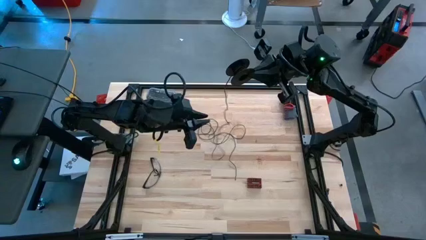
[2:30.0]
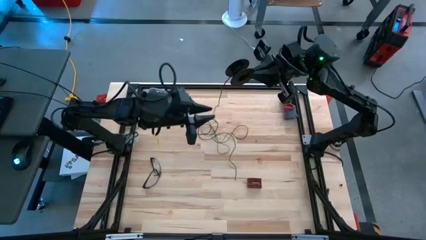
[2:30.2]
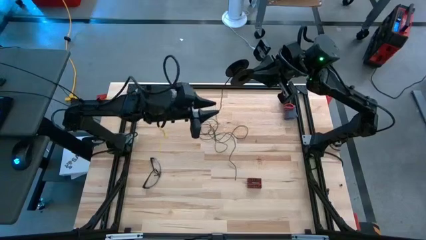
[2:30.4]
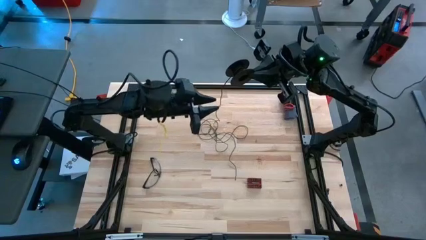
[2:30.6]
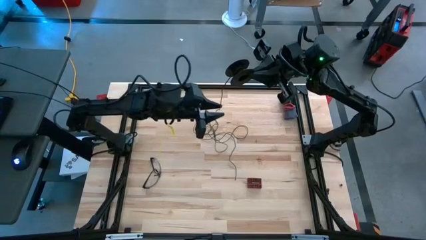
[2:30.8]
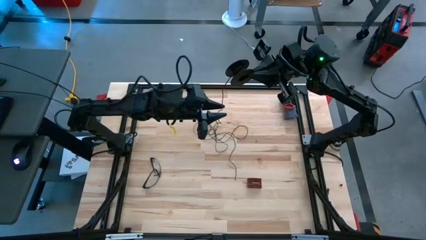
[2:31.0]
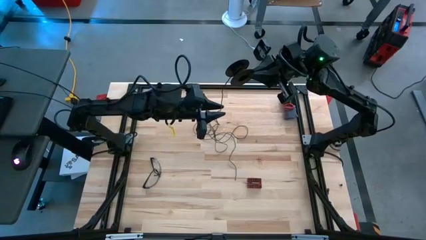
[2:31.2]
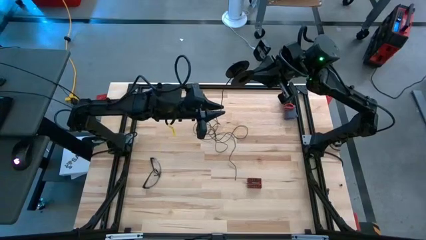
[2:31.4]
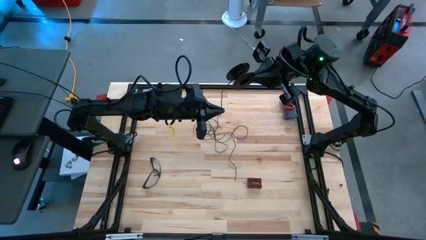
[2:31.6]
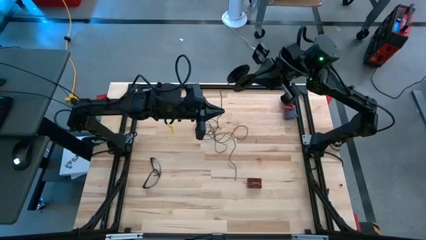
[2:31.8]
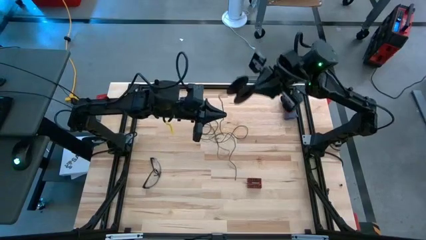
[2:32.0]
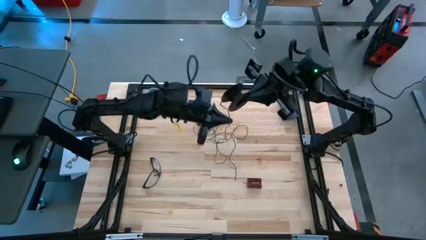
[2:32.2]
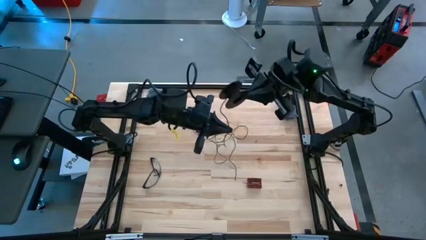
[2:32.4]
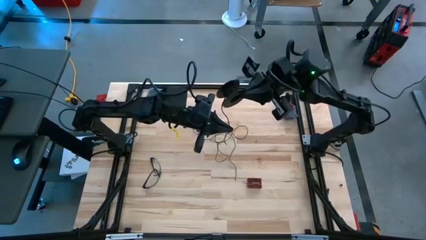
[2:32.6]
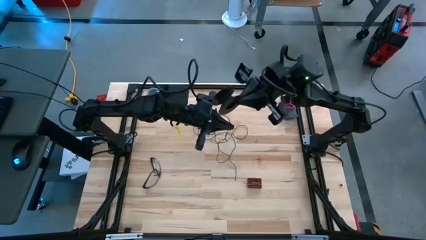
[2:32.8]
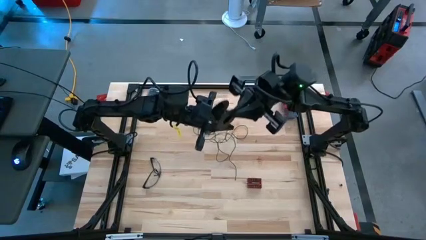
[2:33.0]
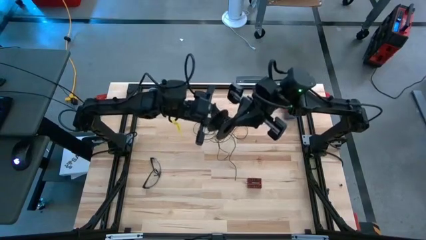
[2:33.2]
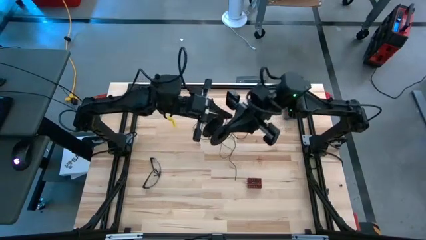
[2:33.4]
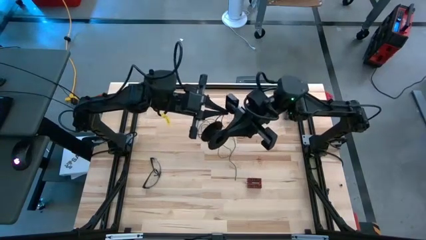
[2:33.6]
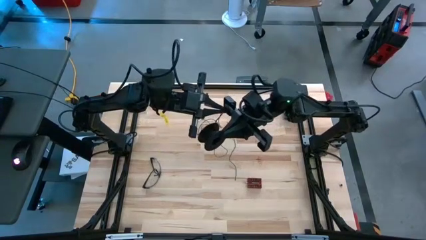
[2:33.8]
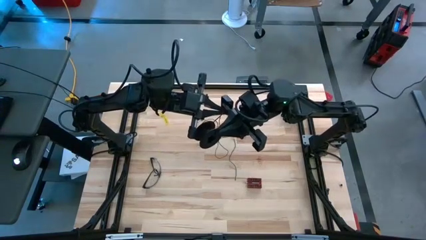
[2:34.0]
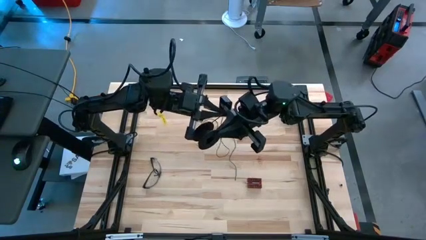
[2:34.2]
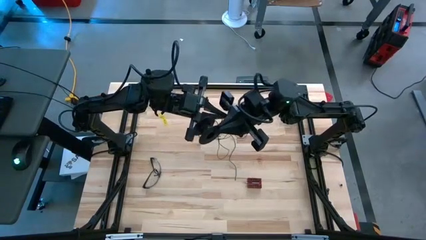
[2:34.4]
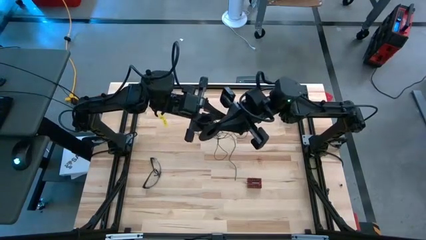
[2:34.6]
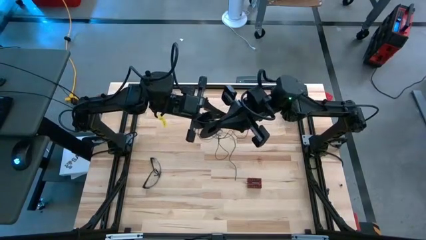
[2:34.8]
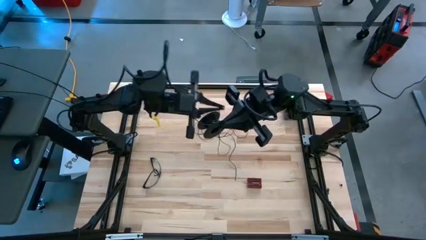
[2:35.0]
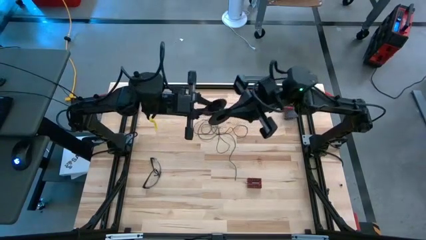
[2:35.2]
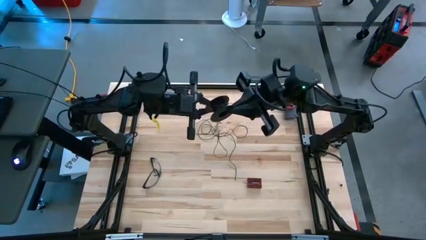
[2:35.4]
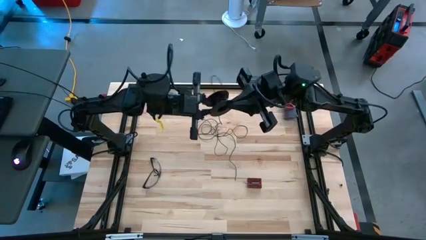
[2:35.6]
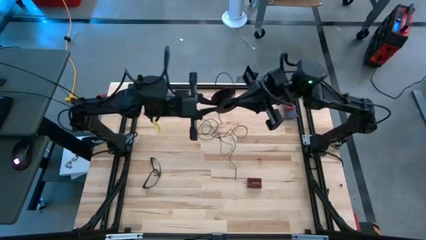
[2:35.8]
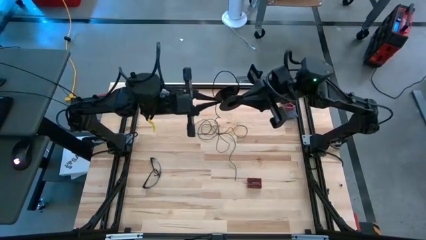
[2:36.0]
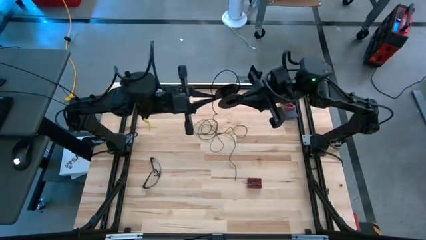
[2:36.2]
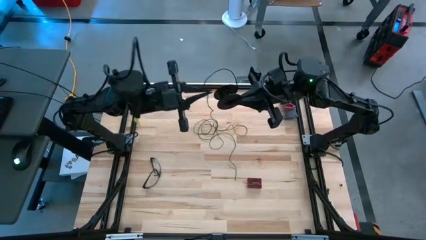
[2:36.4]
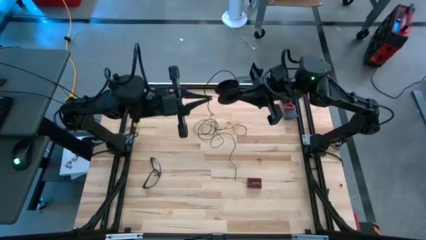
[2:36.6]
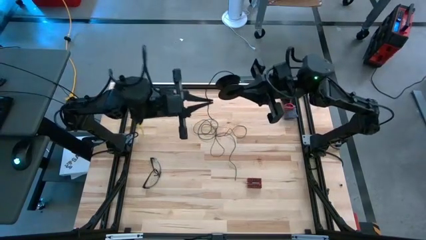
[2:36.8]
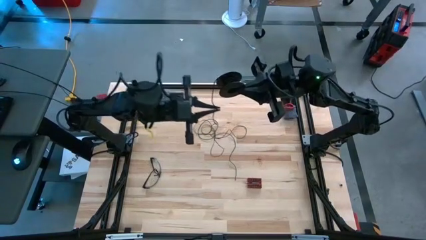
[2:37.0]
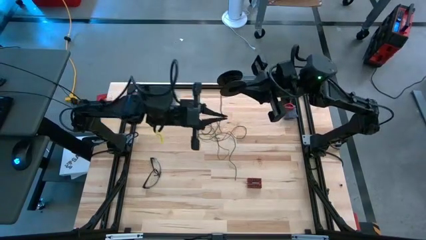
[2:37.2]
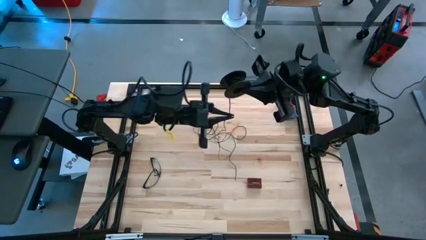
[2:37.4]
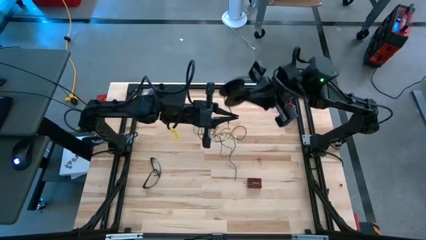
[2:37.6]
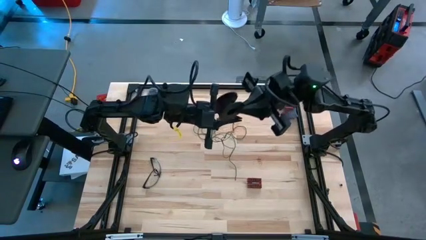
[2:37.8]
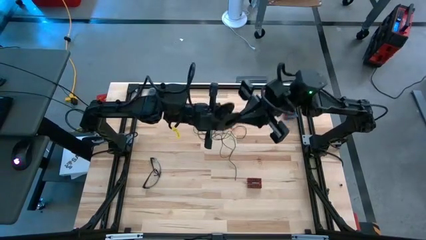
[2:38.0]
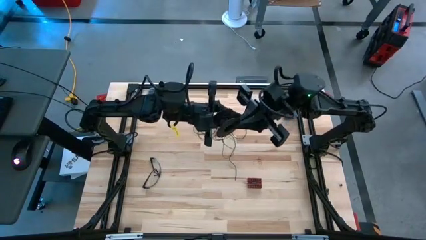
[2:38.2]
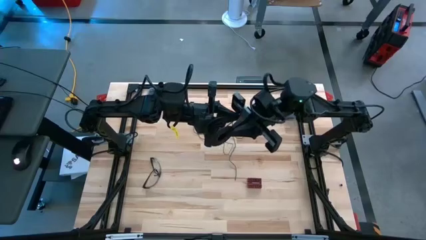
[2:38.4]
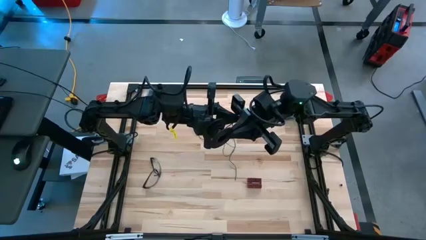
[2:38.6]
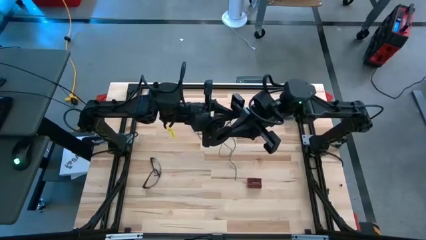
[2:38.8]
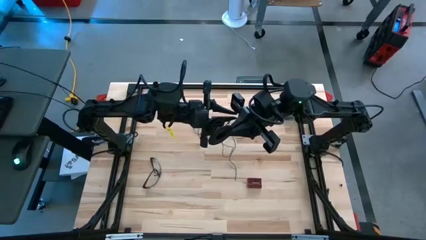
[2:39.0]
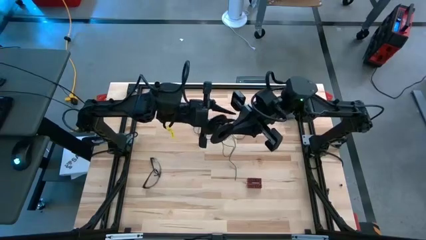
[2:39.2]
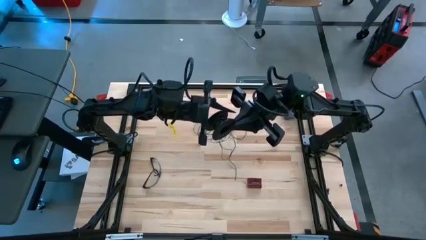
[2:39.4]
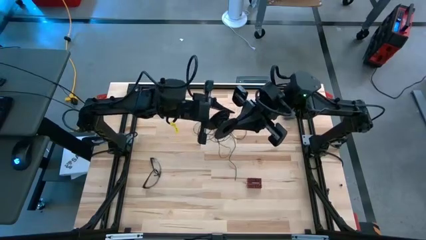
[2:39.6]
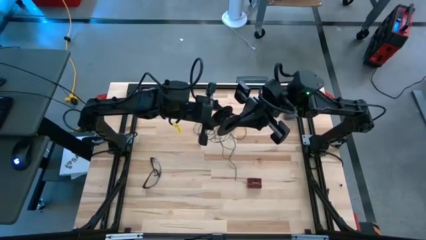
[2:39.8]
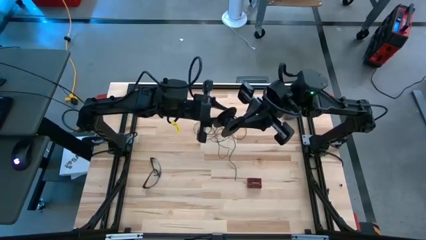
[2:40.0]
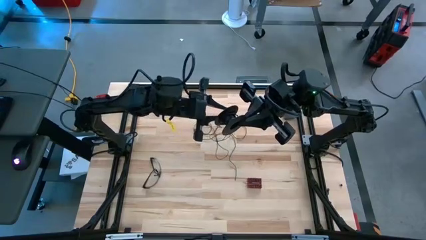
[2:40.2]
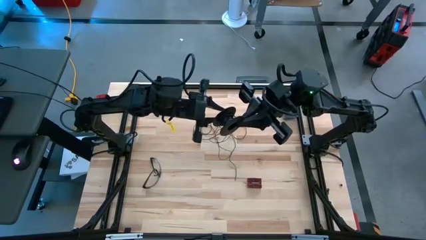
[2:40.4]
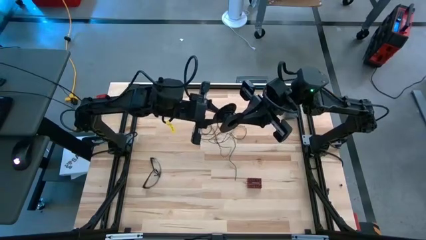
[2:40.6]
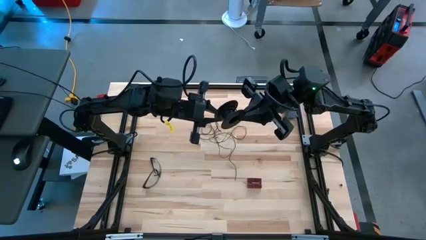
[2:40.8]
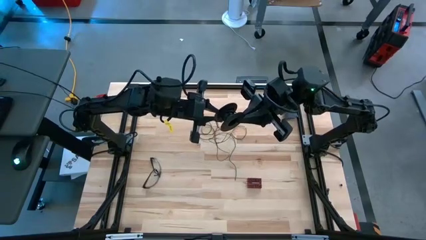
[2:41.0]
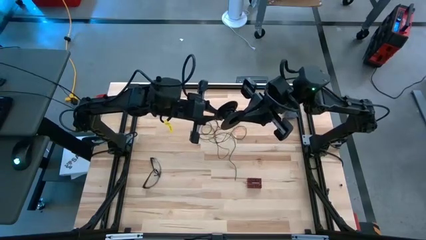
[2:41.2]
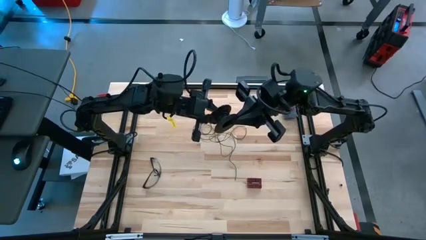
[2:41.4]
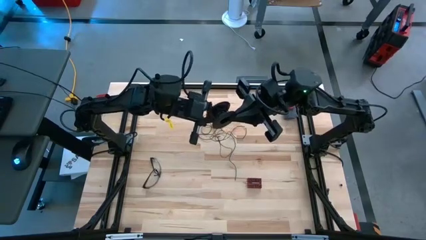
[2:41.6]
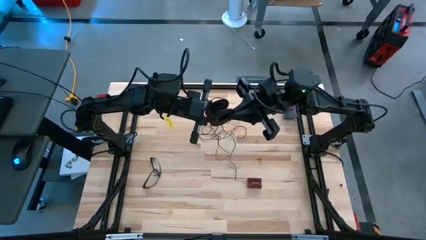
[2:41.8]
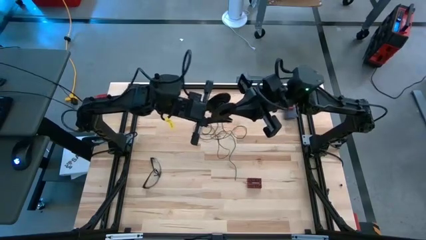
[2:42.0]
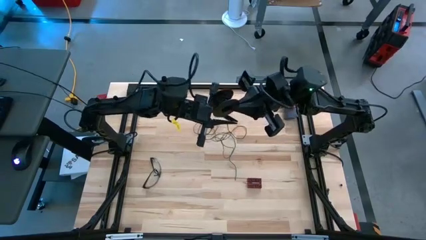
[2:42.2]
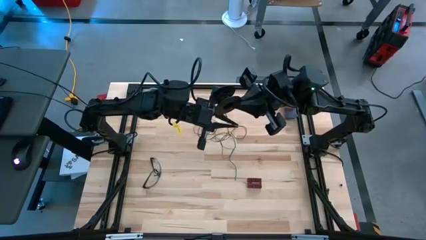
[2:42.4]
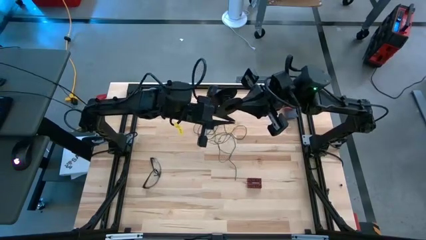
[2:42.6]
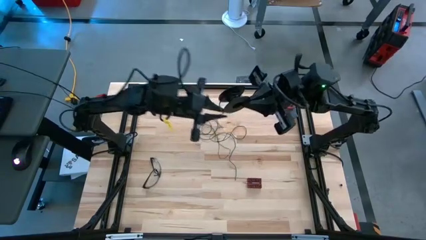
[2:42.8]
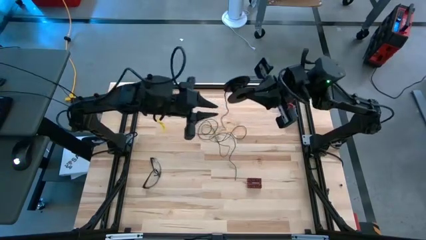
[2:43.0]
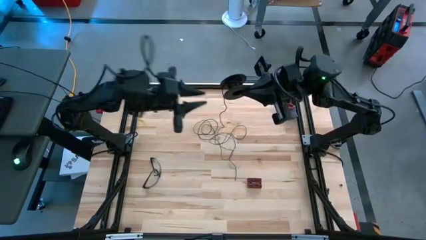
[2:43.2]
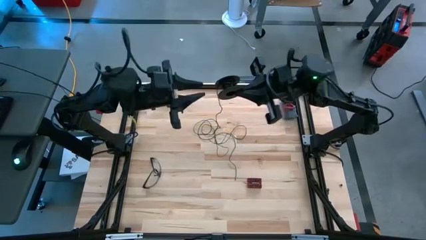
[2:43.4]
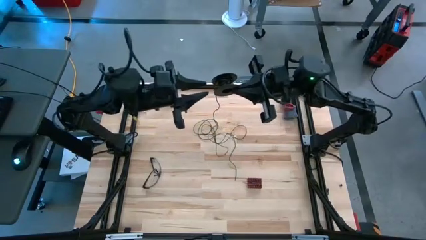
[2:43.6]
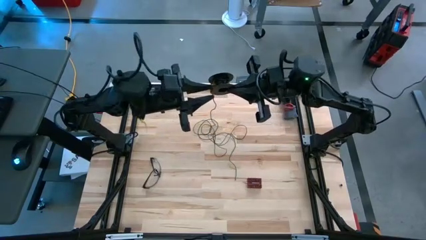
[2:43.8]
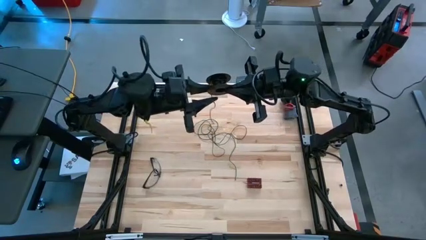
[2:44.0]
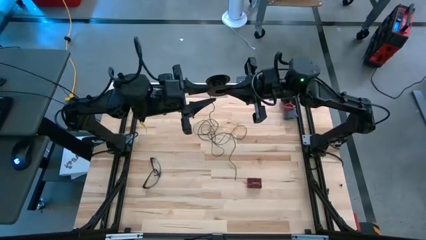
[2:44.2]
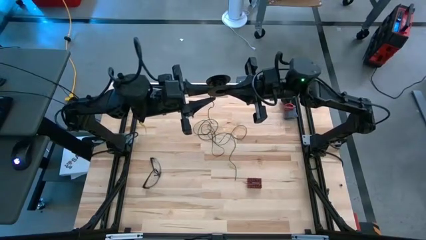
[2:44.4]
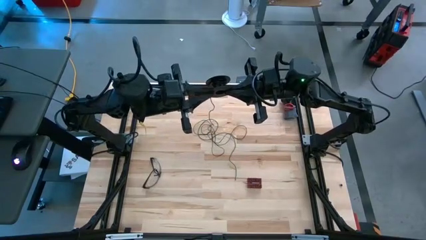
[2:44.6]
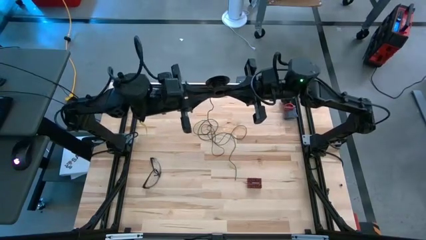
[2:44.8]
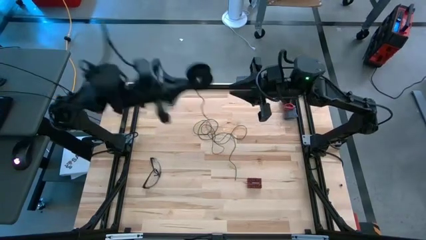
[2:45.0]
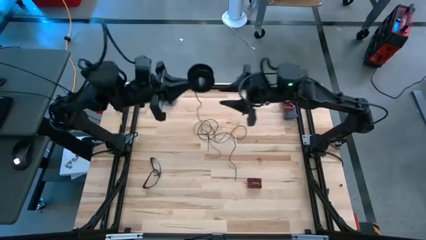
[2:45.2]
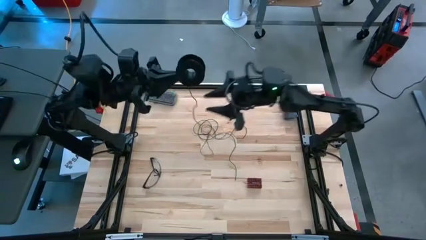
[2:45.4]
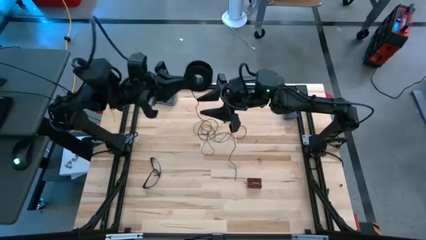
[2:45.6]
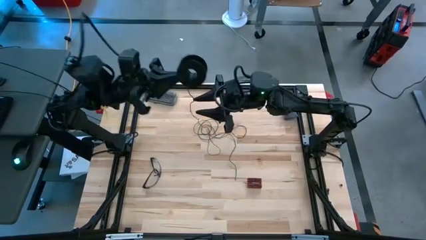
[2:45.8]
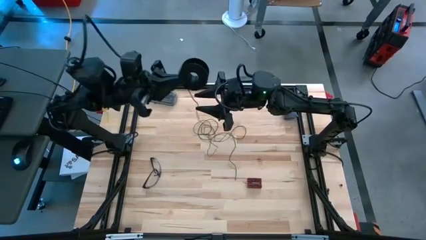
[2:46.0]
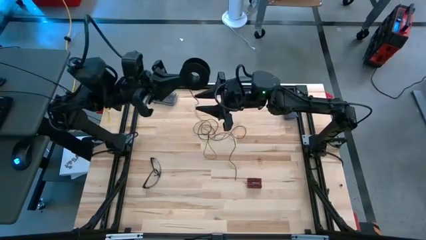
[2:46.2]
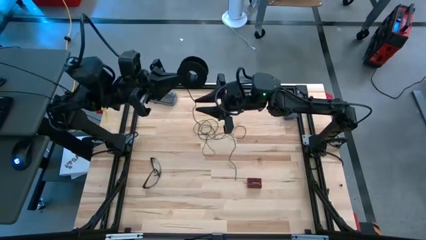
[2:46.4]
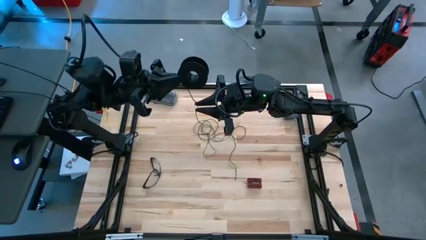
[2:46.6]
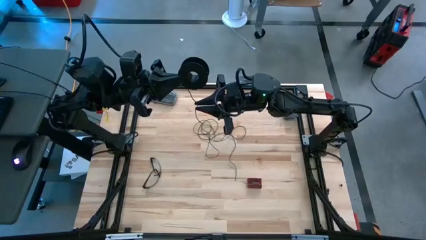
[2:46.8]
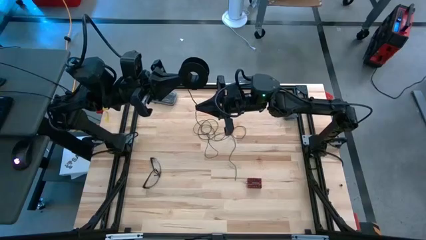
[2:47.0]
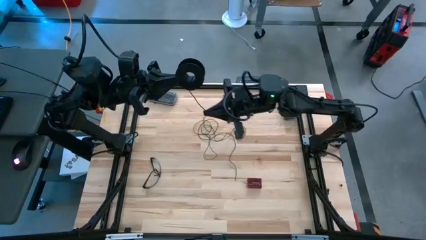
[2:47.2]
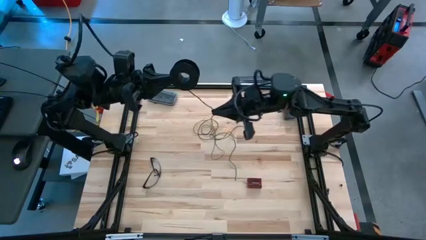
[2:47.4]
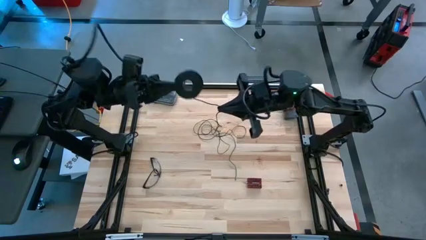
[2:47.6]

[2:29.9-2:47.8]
Task: Coil cords
Coil the black wire into the spool
